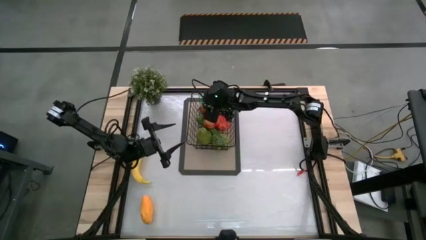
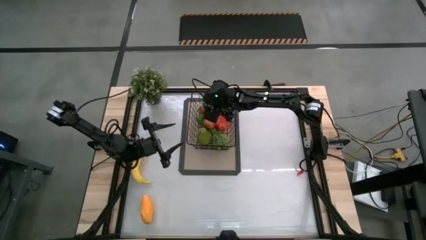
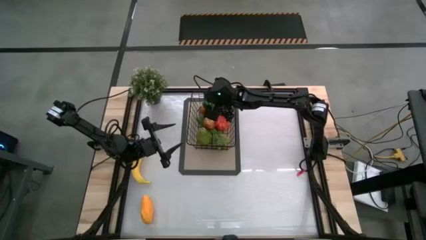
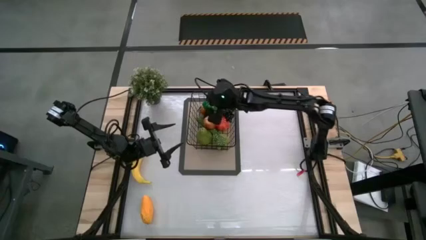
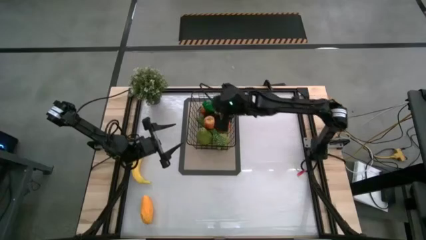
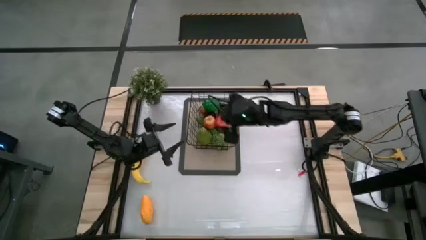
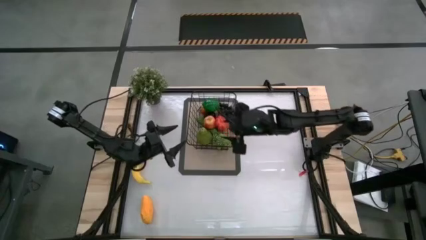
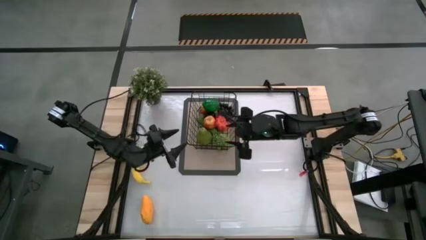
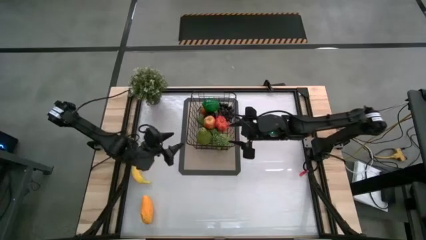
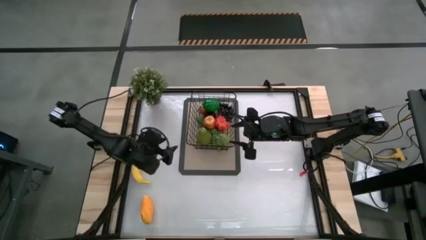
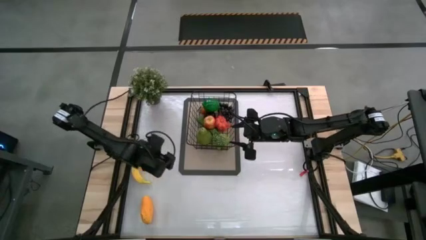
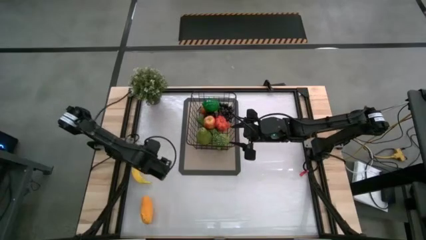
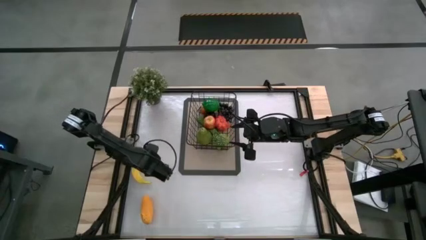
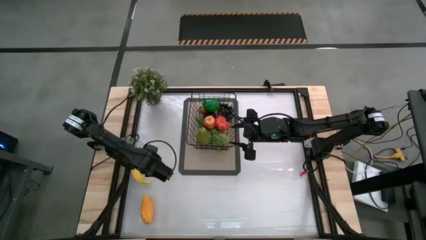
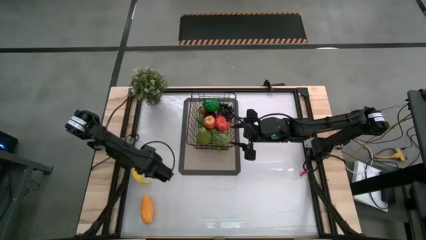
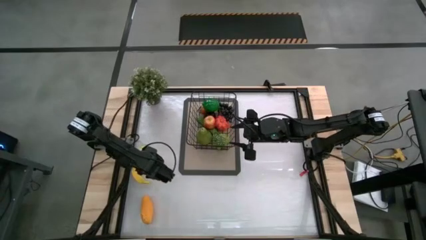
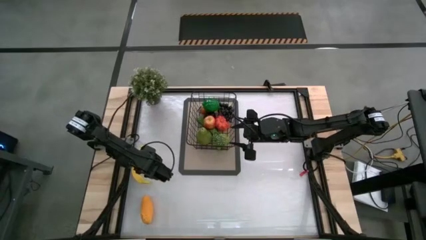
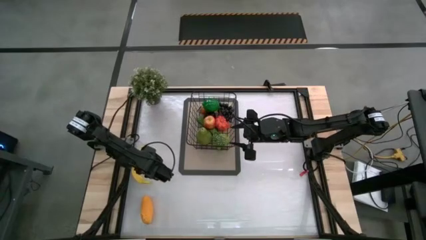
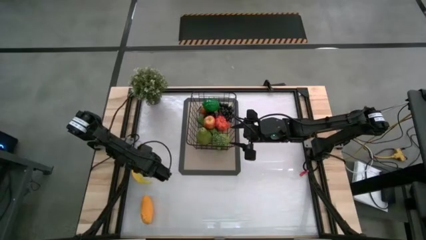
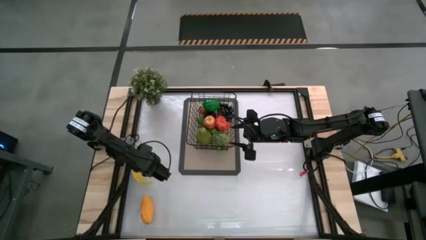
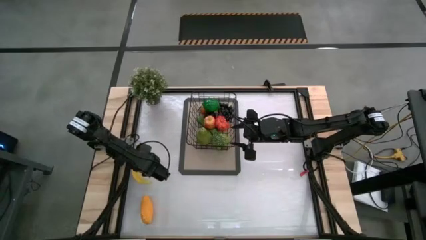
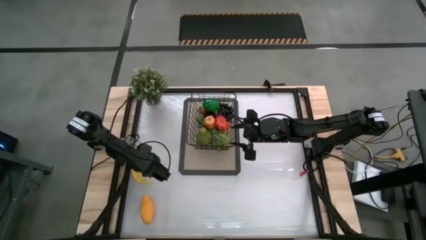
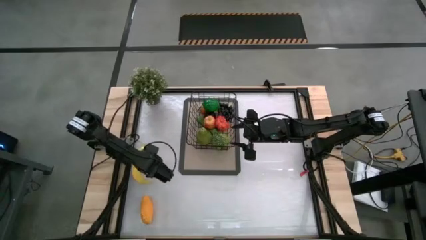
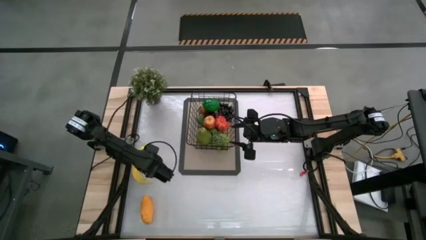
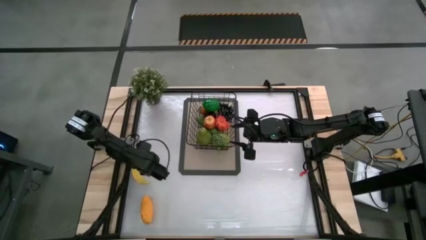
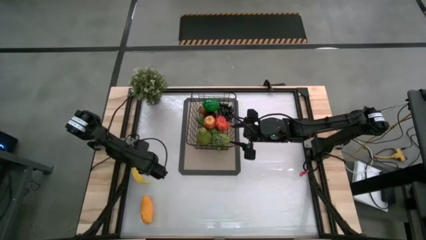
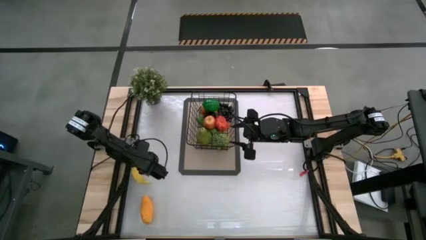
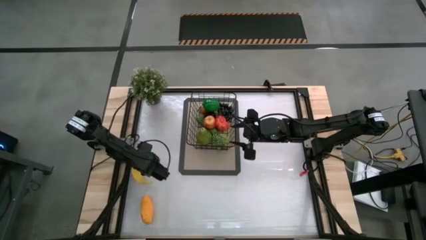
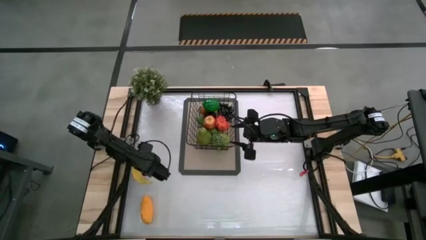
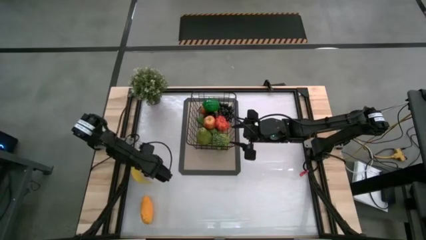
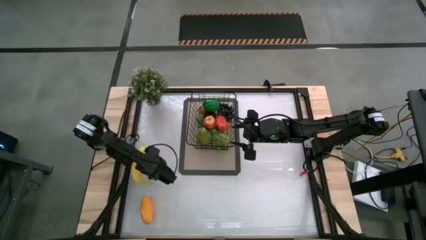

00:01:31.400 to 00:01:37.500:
Task: Build produce basket
Put the banana into the black wire basket

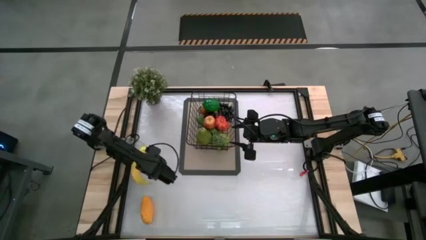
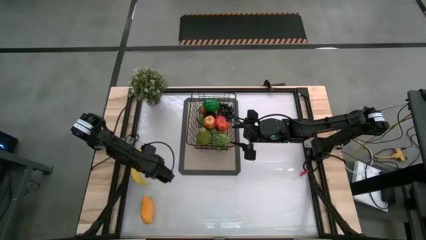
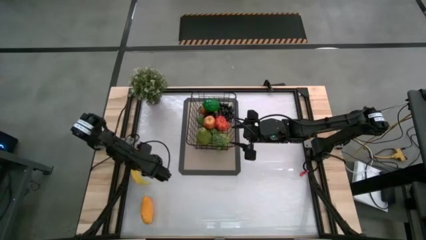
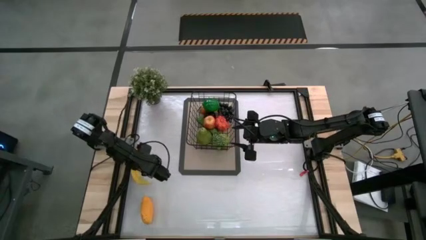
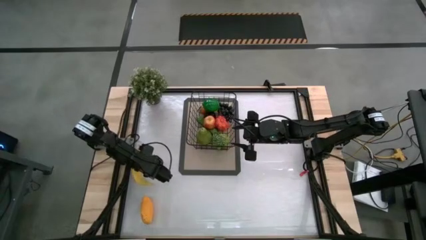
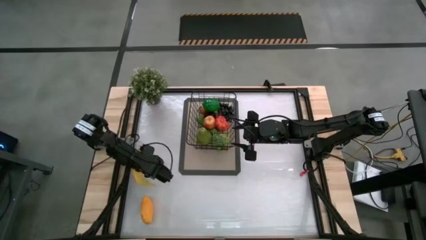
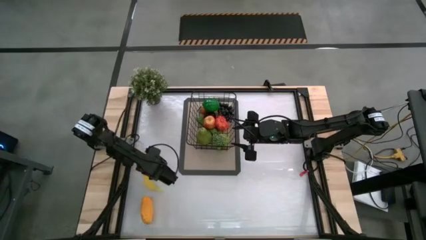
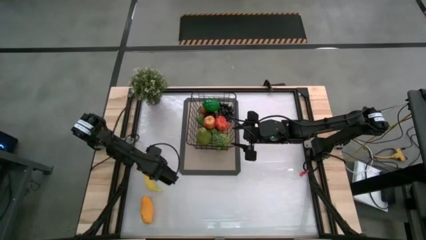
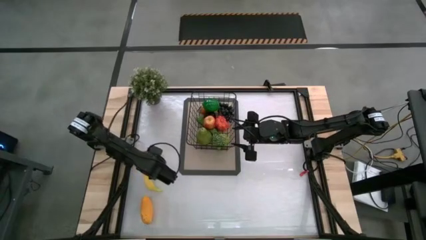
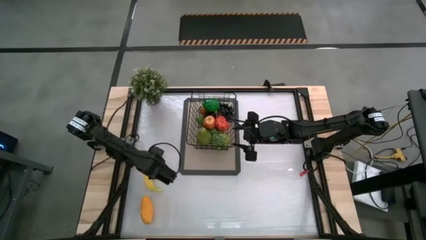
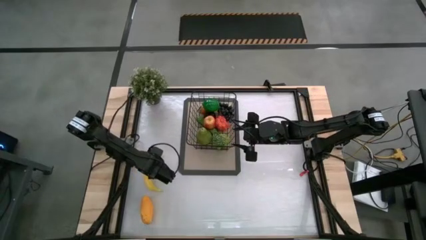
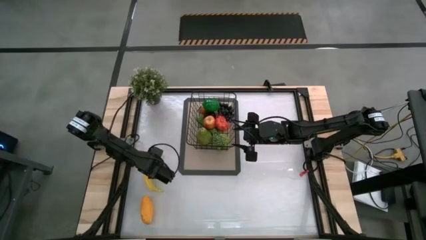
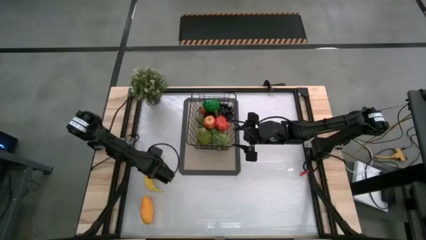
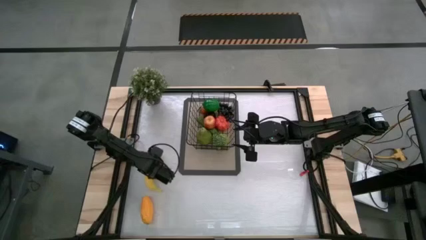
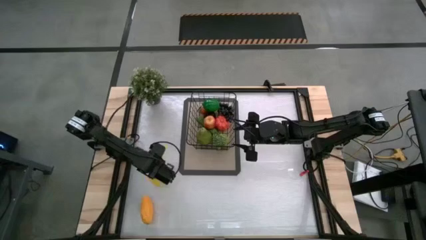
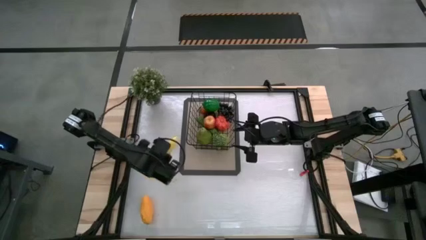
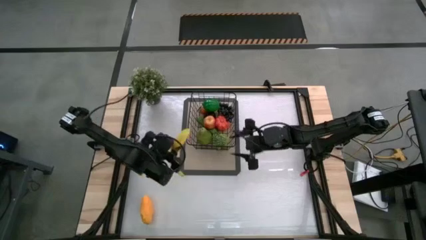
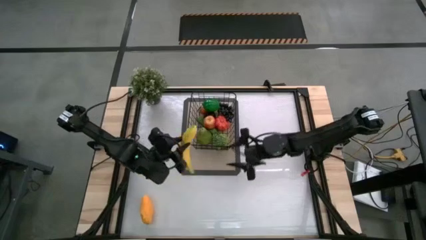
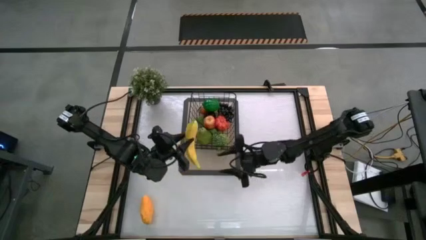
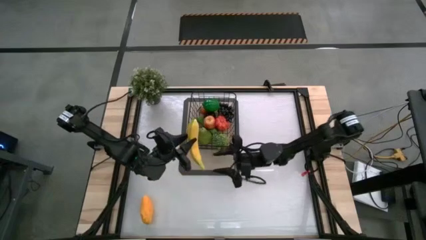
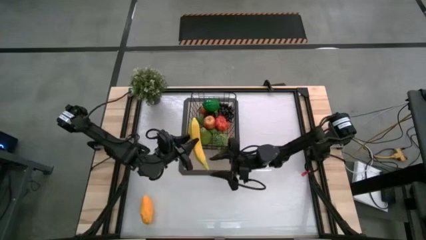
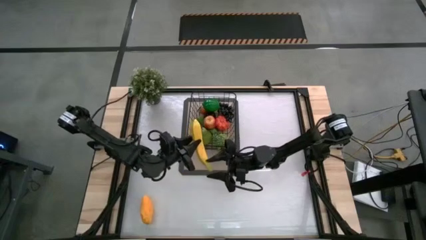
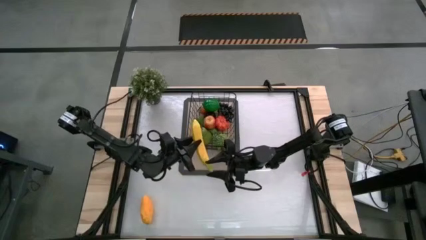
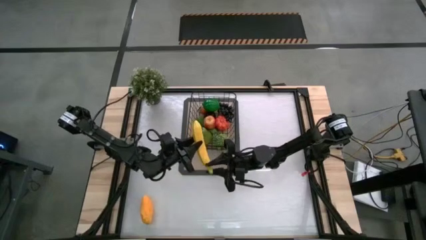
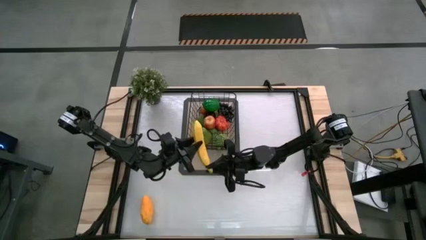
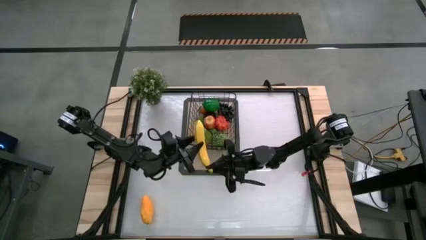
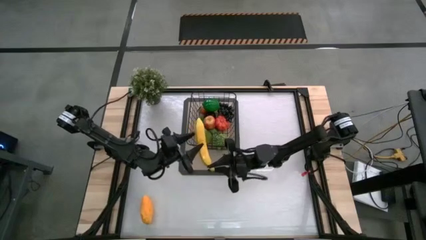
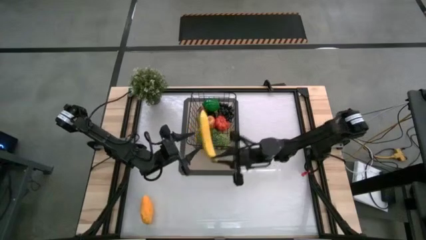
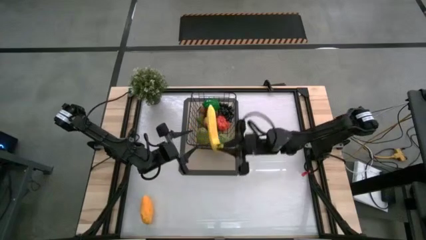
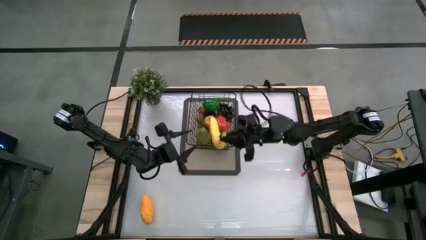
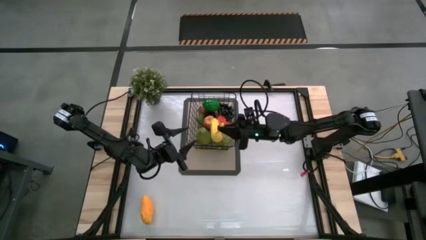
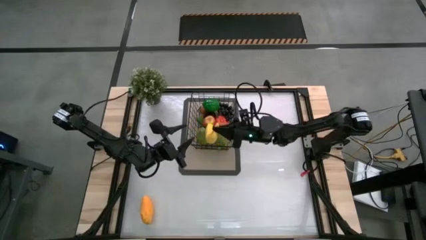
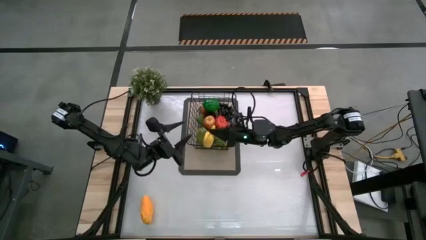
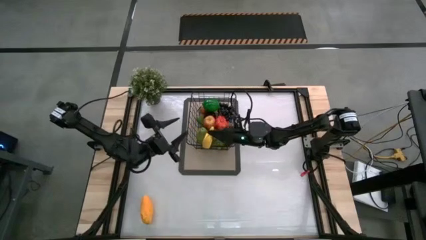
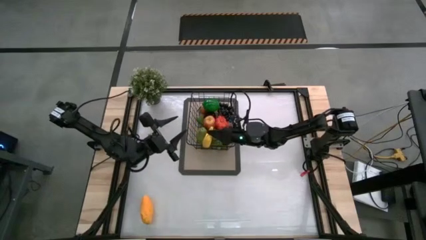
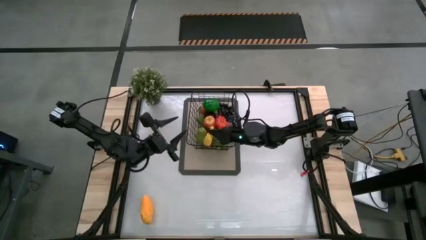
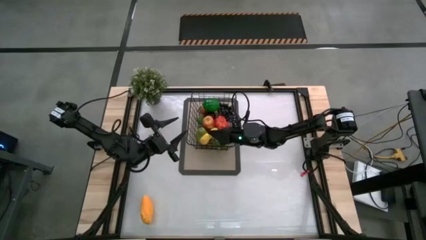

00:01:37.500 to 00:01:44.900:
Put the banana into the black wire basket
